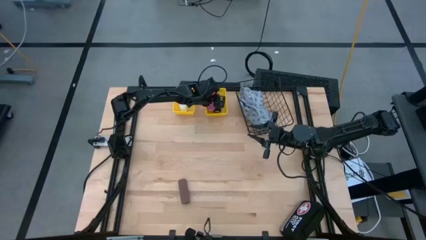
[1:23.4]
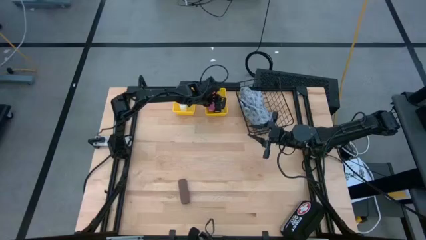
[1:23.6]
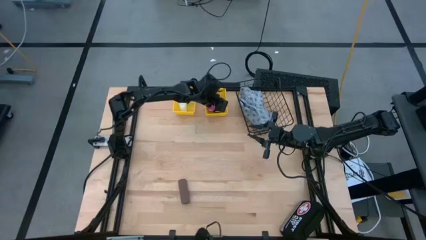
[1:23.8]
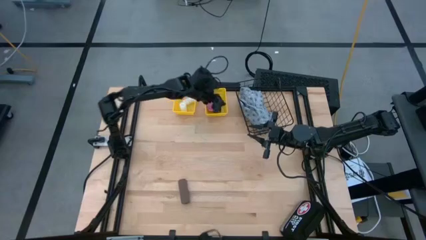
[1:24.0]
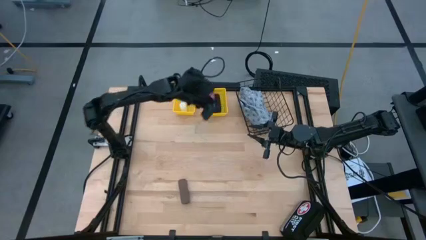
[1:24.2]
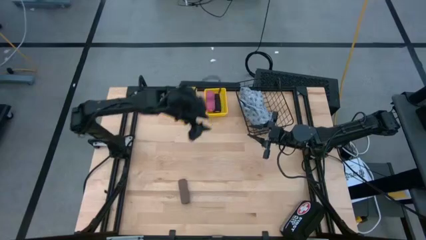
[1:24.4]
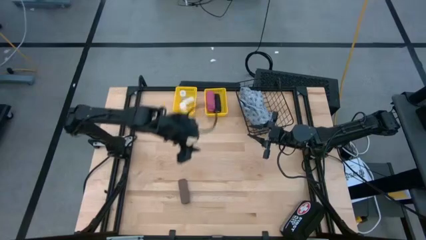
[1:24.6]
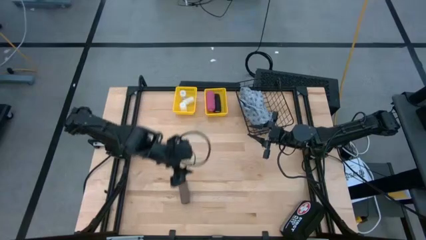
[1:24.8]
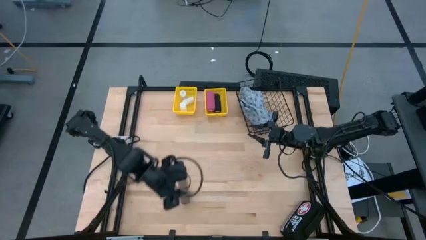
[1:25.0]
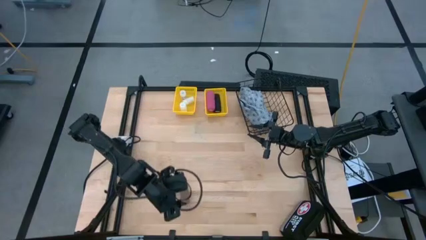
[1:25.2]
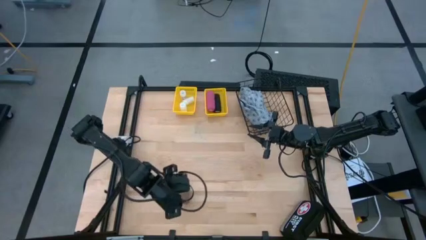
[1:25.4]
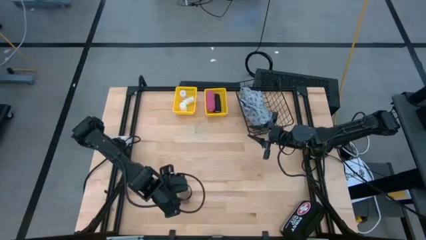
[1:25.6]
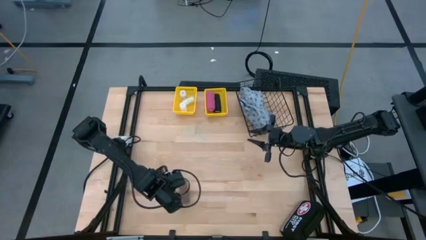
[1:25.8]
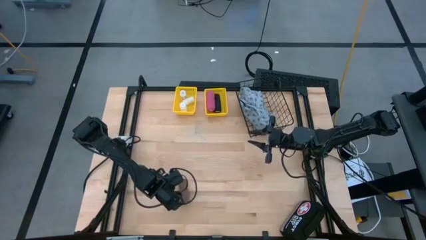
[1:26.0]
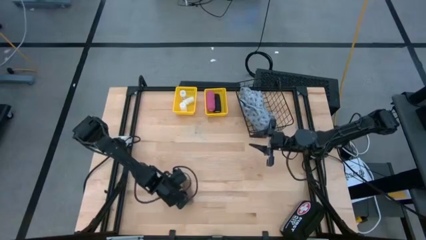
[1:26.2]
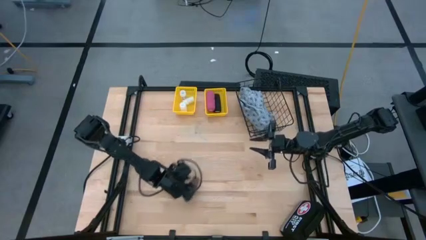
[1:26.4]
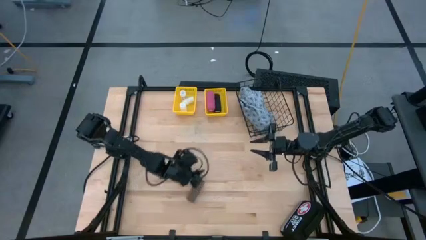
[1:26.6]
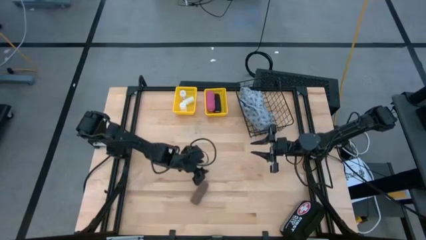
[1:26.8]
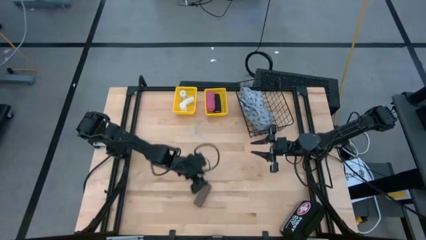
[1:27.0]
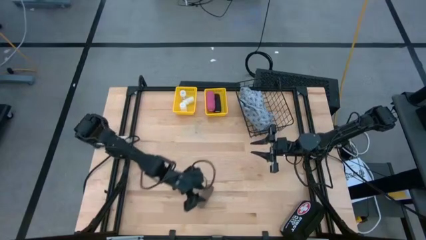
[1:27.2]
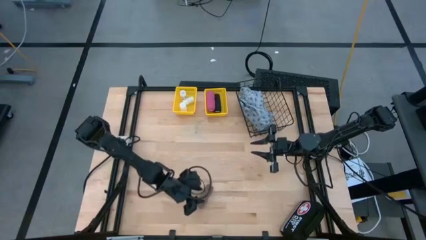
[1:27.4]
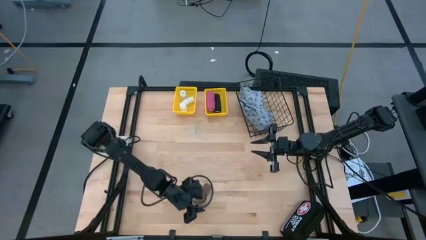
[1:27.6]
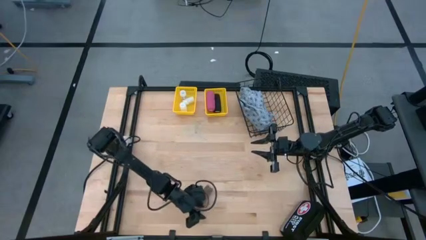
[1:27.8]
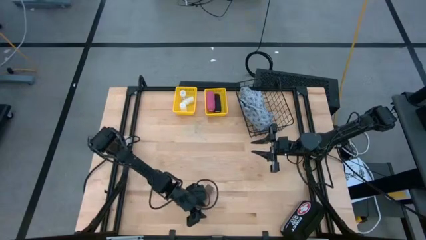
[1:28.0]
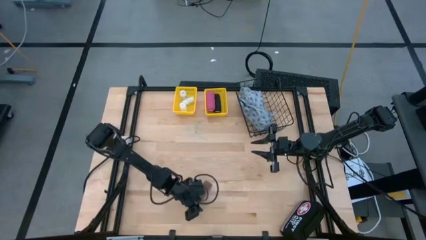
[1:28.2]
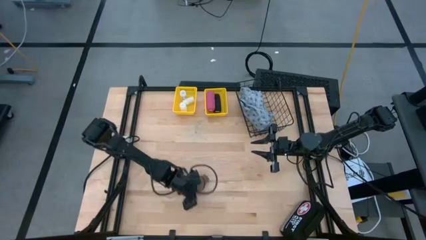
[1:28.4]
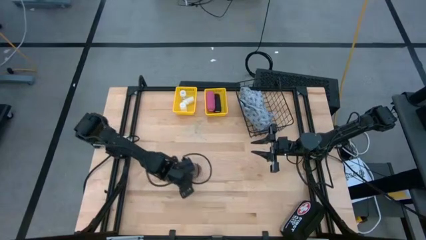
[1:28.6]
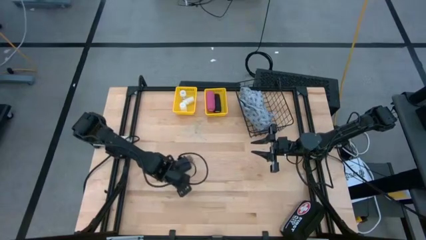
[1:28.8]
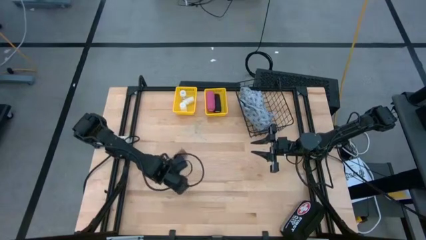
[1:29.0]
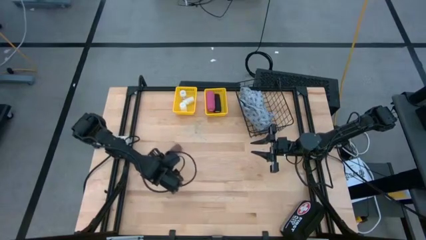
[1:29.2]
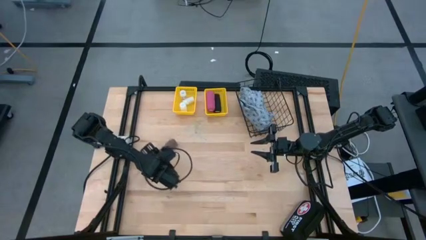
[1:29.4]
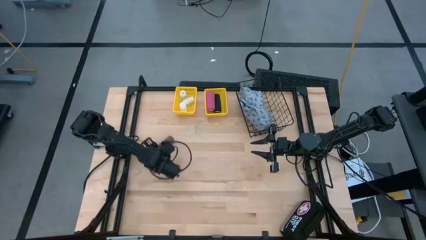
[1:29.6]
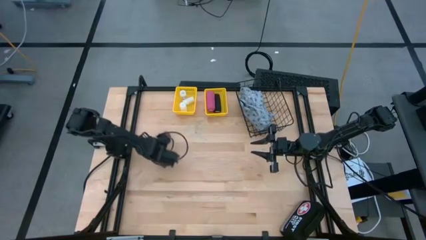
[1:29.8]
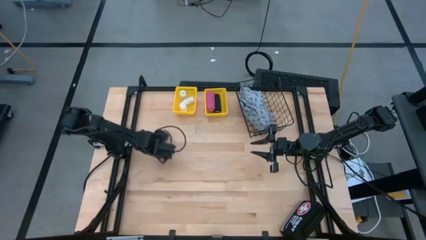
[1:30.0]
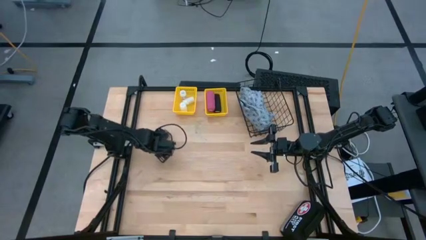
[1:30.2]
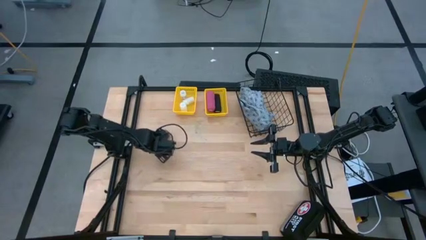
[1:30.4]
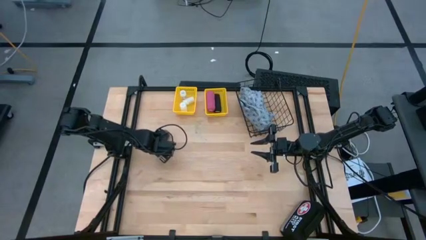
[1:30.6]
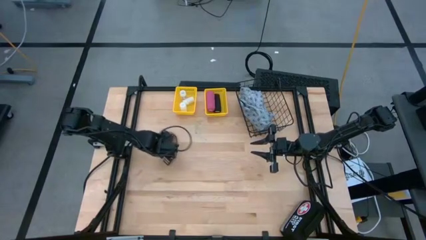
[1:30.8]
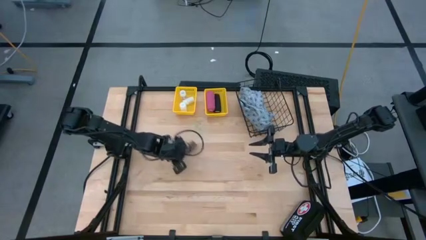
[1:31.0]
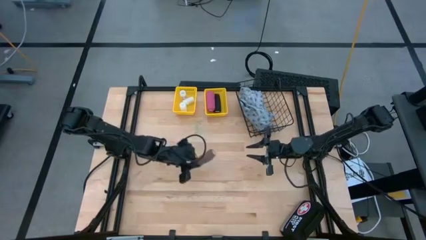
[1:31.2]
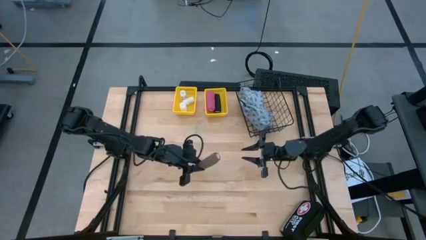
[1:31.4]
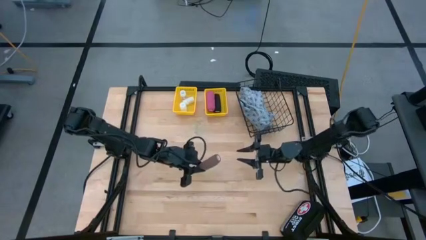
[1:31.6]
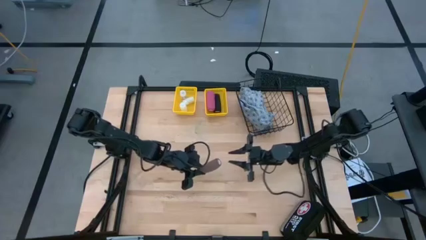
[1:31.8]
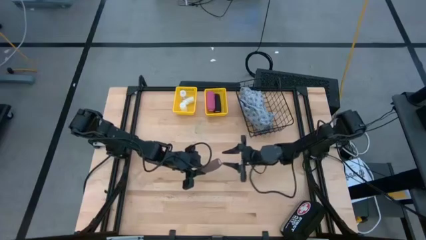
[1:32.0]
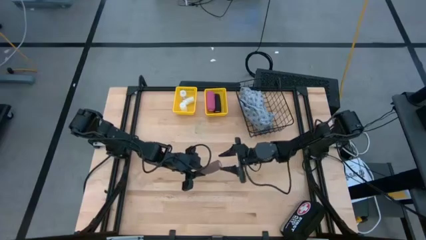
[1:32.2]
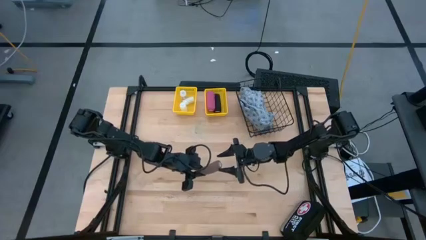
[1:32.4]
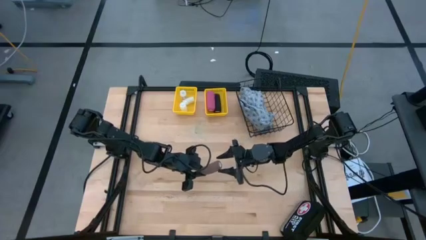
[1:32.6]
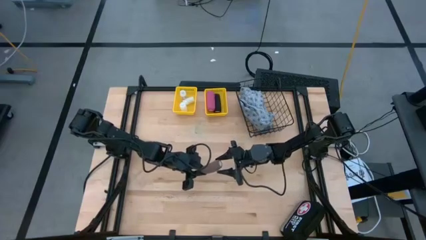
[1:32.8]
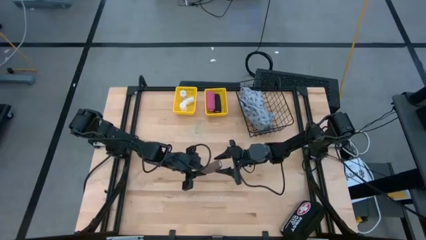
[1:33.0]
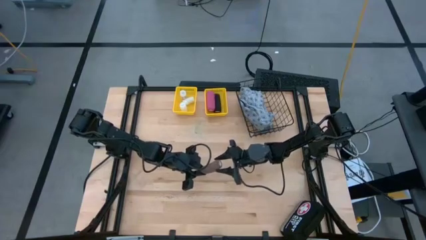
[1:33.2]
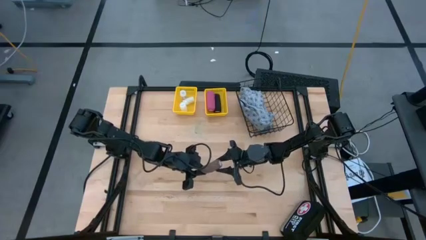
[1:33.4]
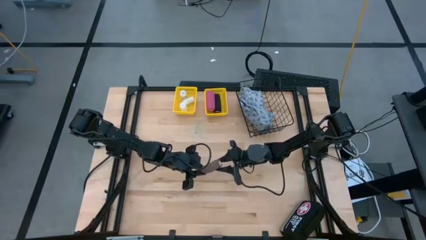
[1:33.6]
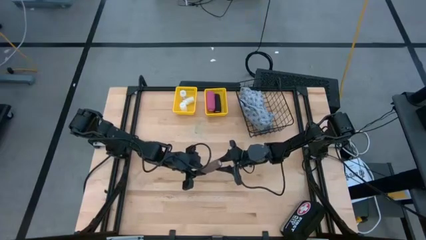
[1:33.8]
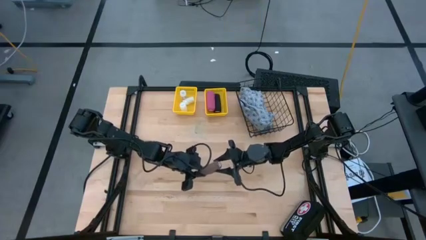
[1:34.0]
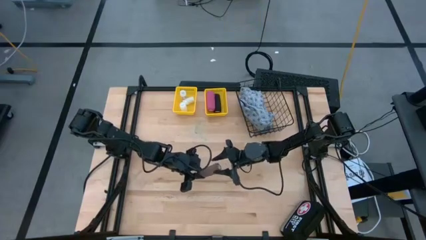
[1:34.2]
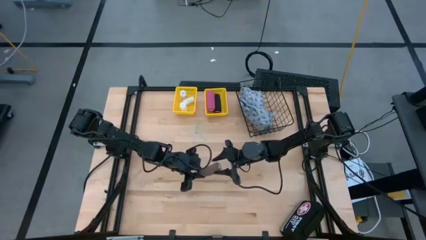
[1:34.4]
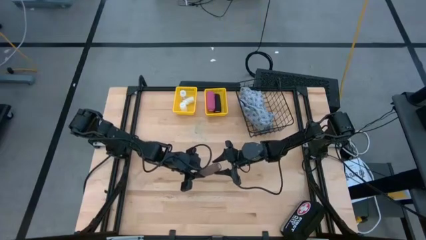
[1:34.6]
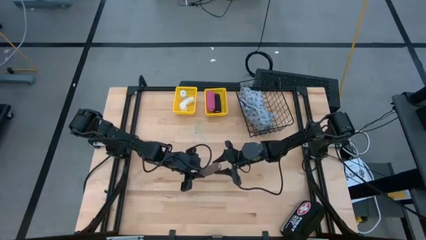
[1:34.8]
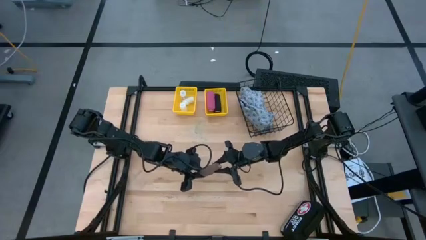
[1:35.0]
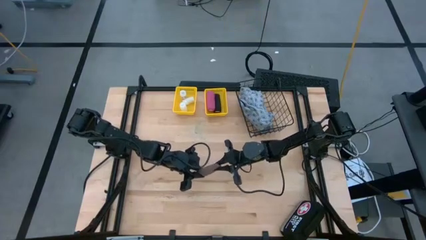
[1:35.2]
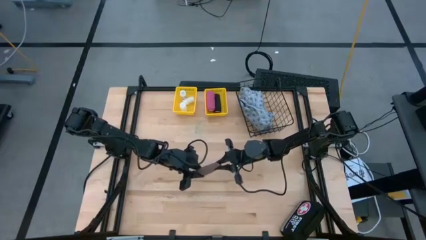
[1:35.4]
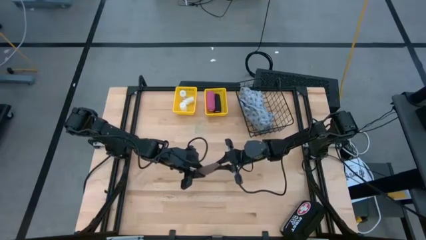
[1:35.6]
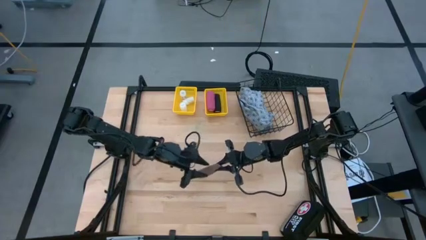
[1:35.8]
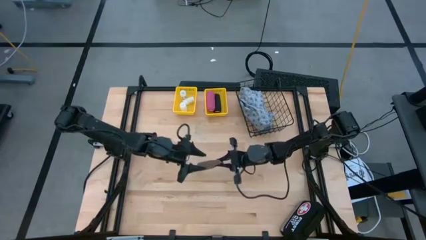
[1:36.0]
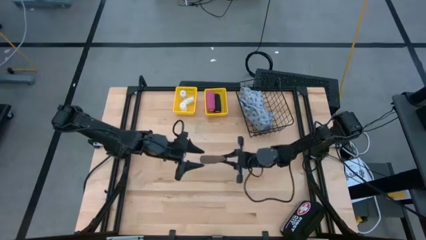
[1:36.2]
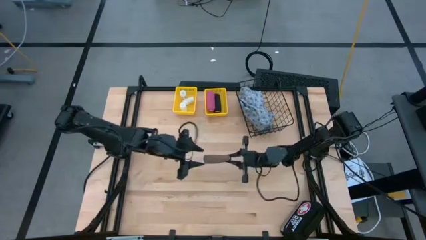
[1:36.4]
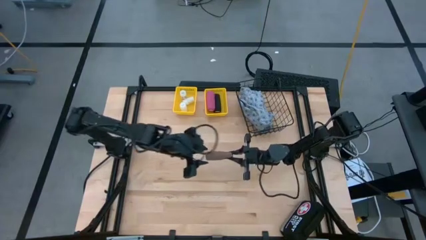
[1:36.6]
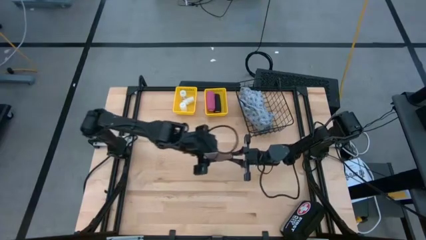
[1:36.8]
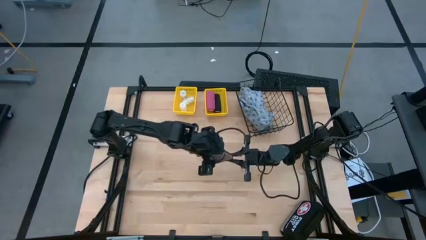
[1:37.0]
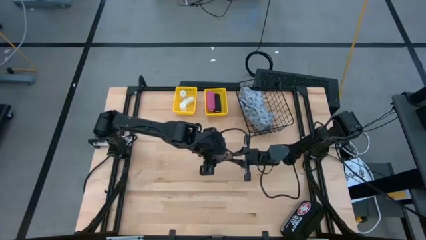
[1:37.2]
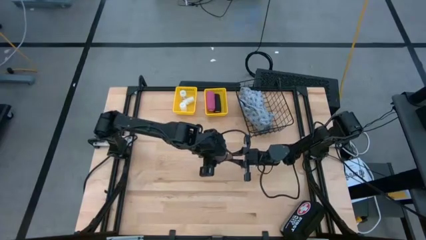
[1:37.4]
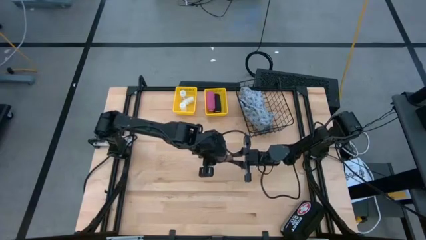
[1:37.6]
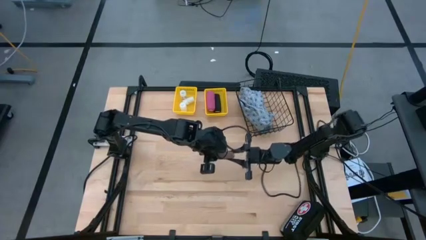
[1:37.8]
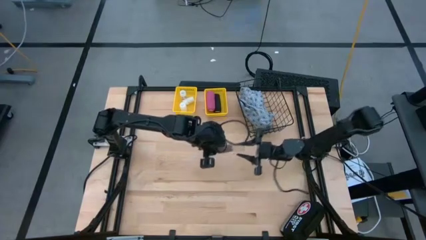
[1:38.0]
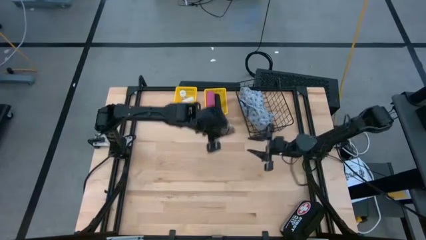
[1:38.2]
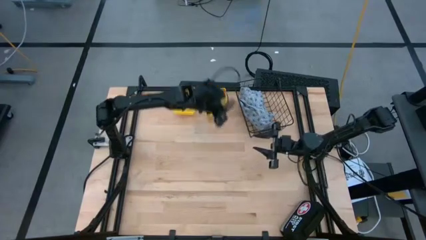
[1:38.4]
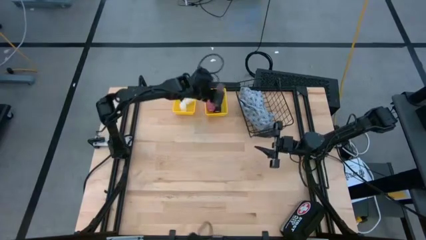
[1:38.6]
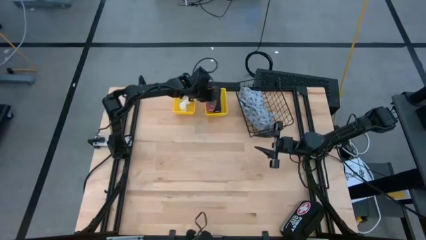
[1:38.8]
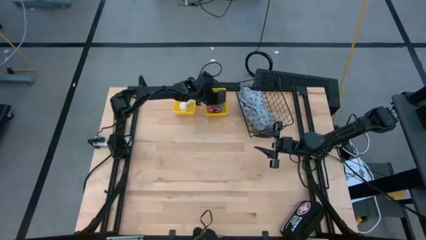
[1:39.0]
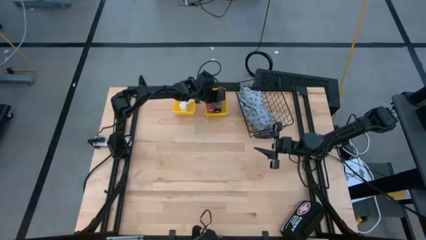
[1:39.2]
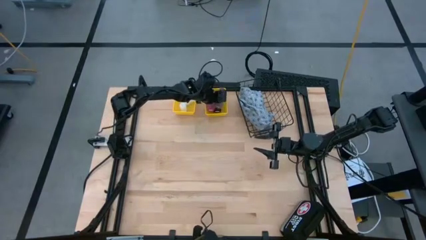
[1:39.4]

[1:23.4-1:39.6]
Task: Pick & Place Medicine items
Put the brown bandage into the right yellow basket
